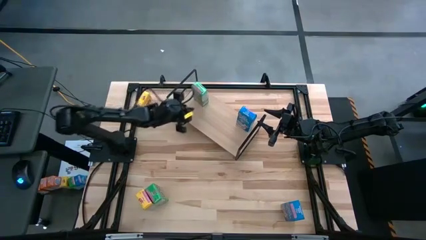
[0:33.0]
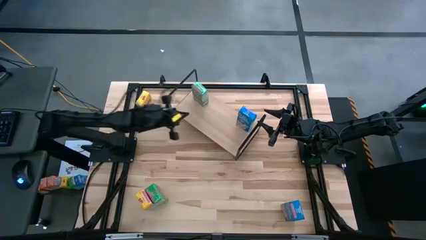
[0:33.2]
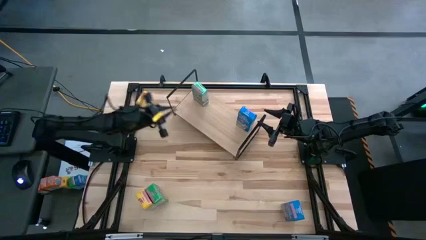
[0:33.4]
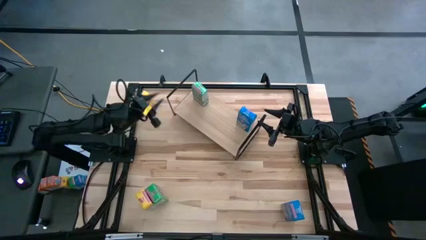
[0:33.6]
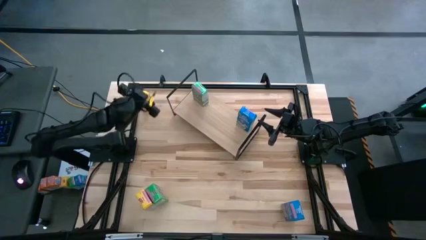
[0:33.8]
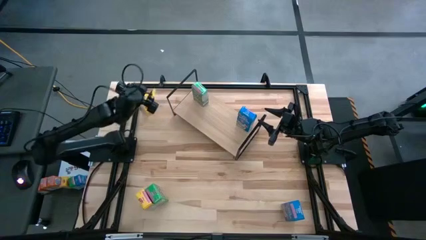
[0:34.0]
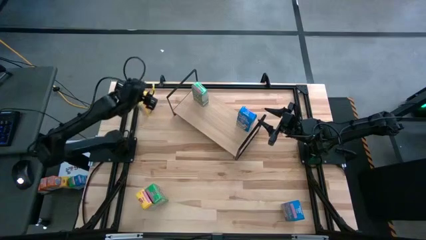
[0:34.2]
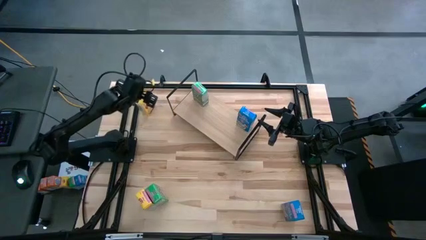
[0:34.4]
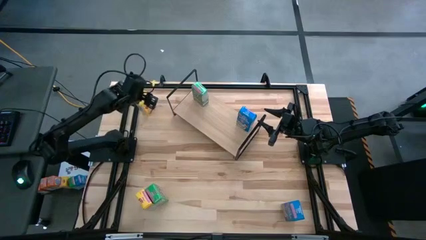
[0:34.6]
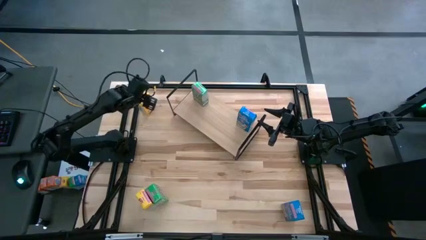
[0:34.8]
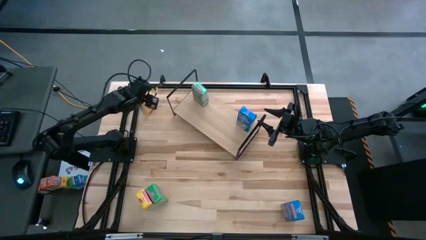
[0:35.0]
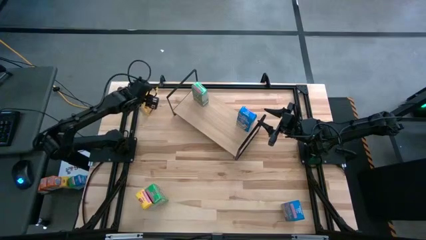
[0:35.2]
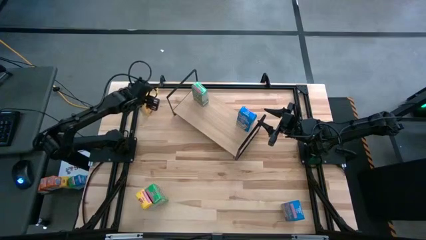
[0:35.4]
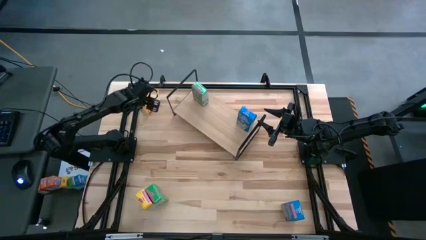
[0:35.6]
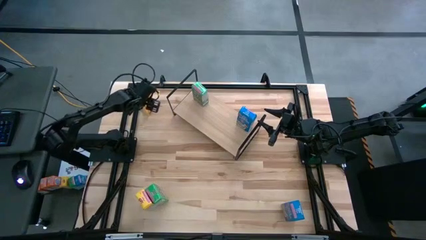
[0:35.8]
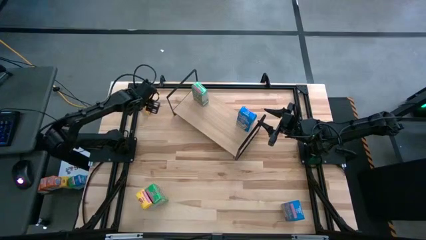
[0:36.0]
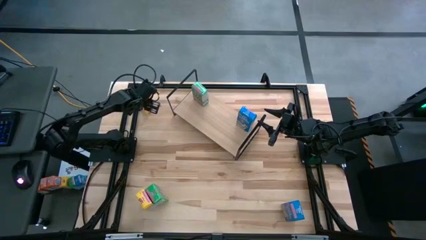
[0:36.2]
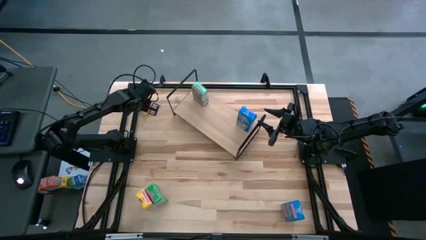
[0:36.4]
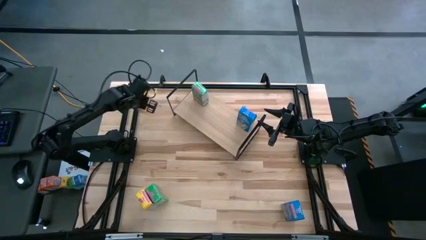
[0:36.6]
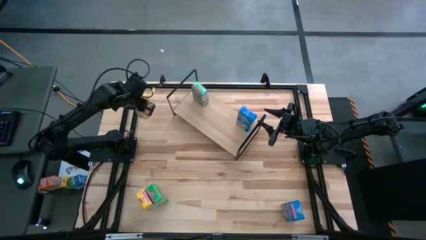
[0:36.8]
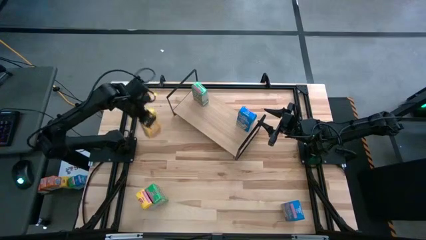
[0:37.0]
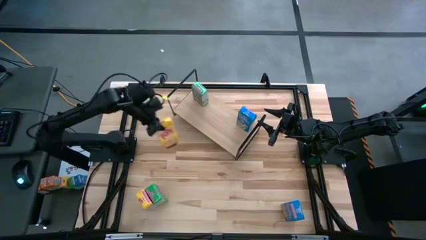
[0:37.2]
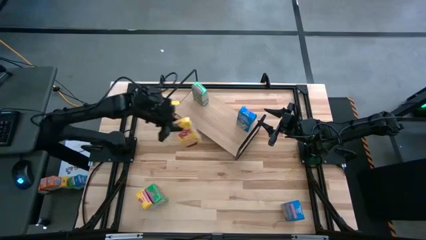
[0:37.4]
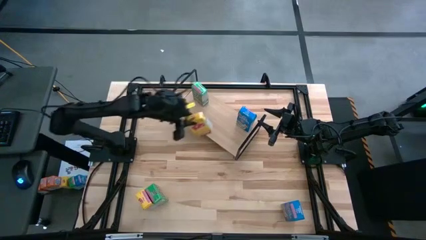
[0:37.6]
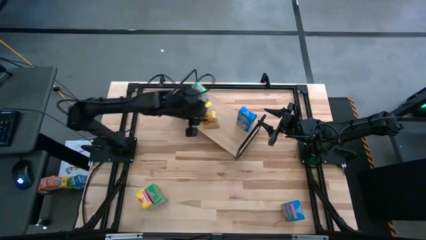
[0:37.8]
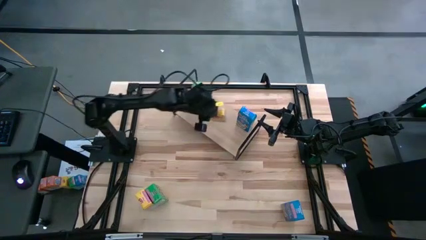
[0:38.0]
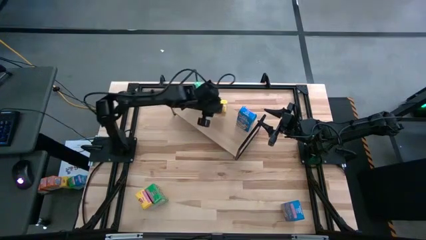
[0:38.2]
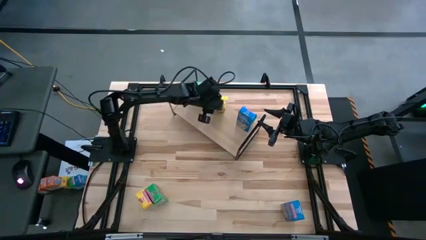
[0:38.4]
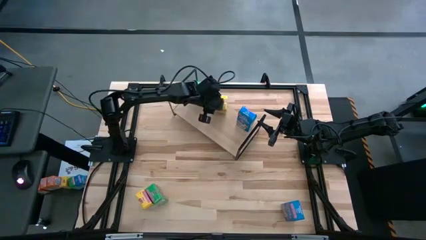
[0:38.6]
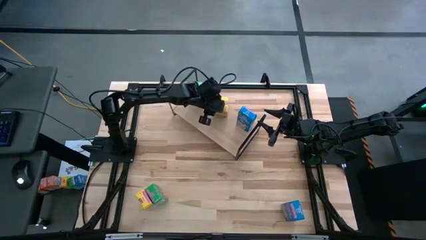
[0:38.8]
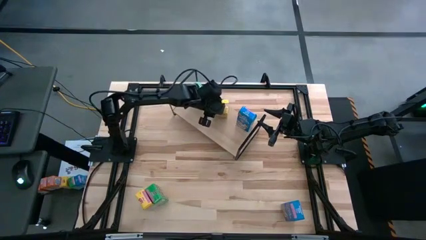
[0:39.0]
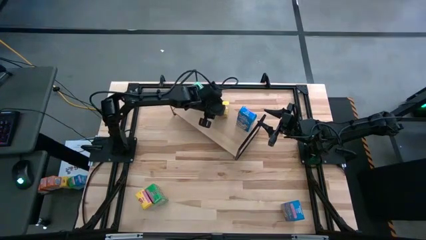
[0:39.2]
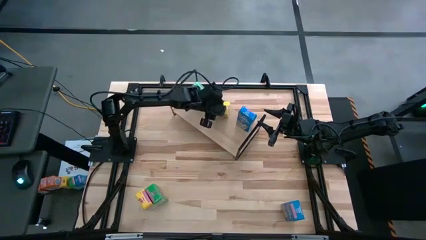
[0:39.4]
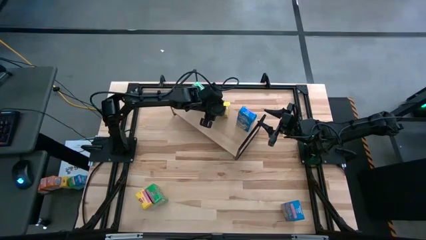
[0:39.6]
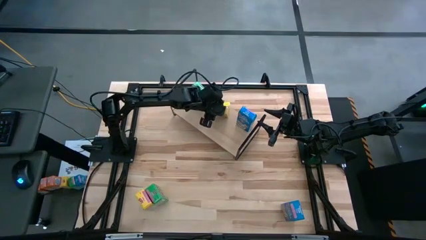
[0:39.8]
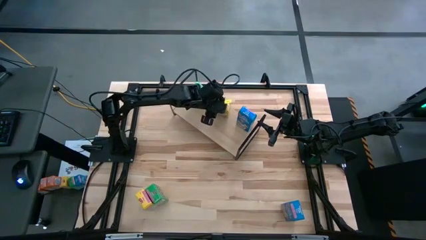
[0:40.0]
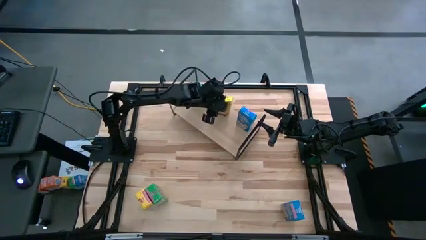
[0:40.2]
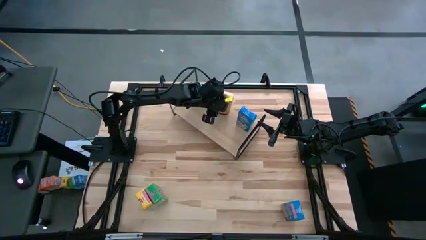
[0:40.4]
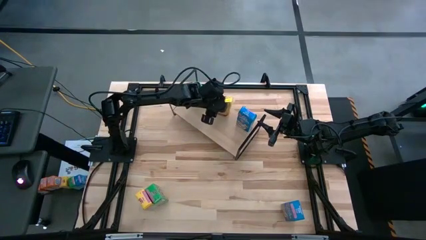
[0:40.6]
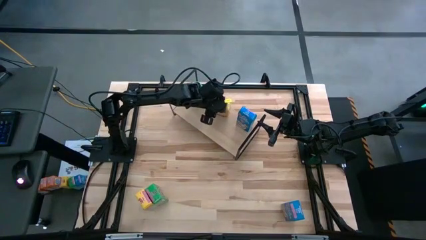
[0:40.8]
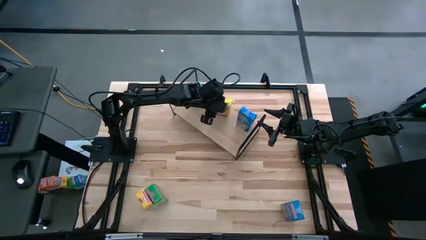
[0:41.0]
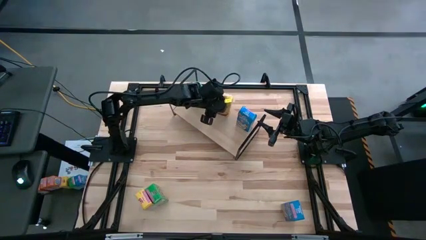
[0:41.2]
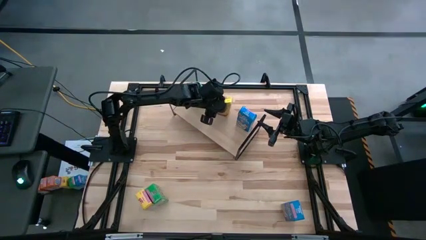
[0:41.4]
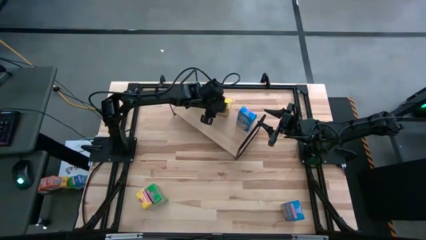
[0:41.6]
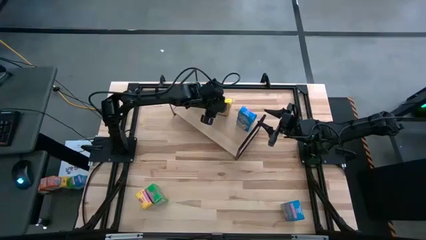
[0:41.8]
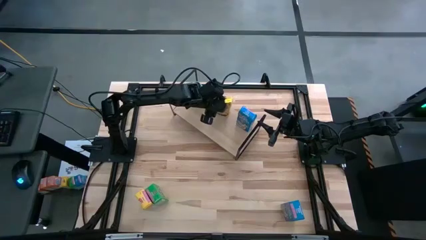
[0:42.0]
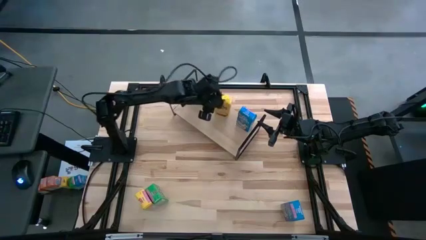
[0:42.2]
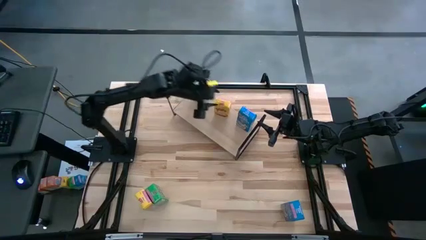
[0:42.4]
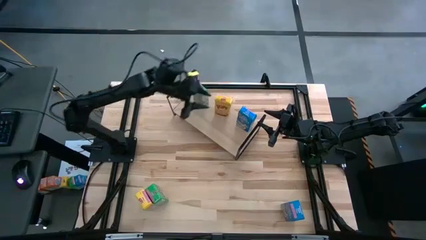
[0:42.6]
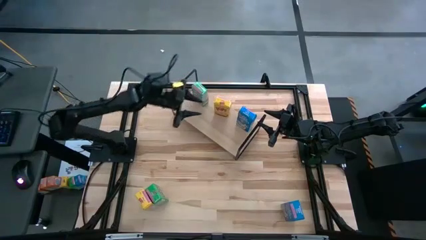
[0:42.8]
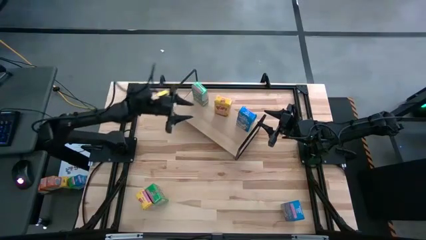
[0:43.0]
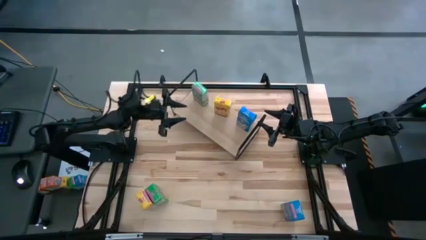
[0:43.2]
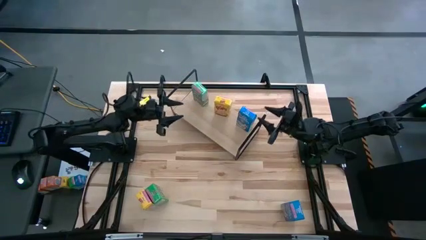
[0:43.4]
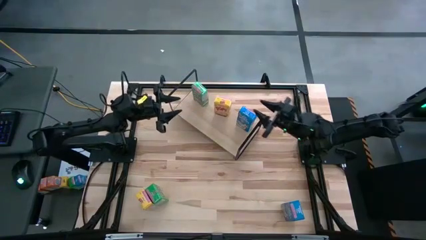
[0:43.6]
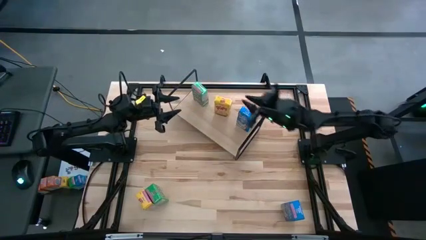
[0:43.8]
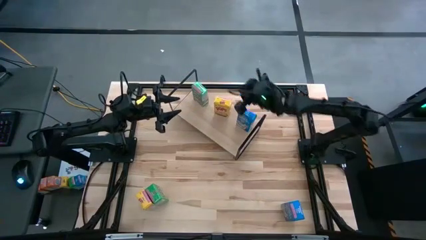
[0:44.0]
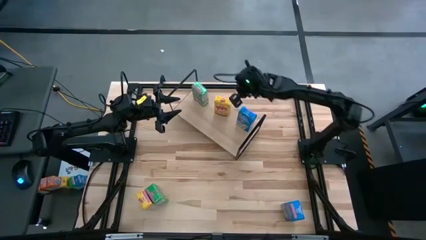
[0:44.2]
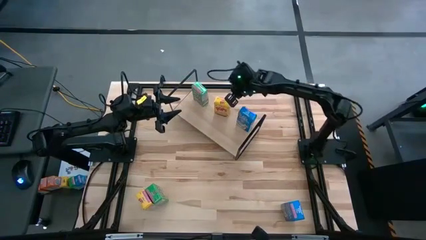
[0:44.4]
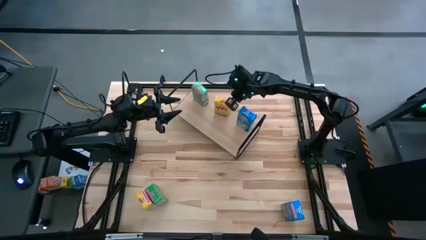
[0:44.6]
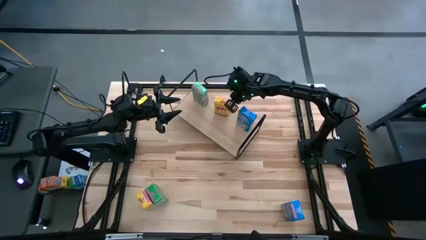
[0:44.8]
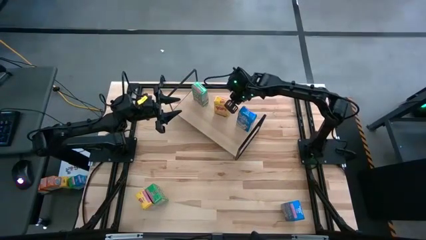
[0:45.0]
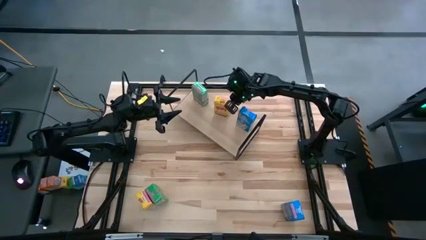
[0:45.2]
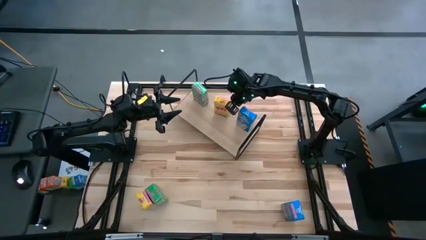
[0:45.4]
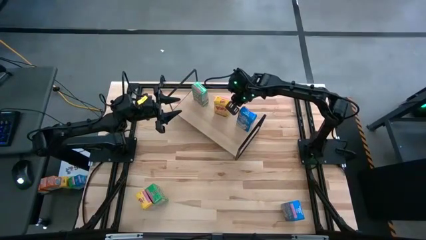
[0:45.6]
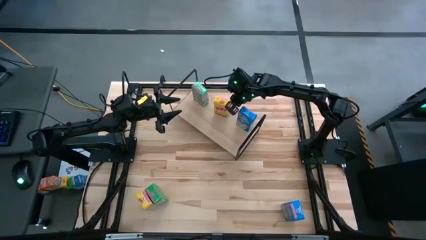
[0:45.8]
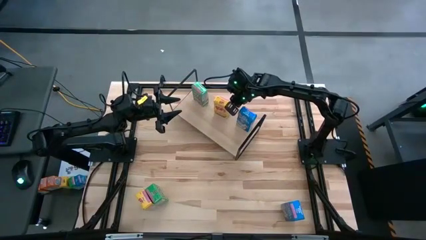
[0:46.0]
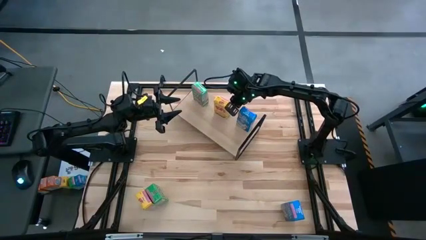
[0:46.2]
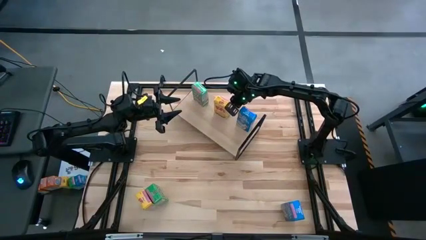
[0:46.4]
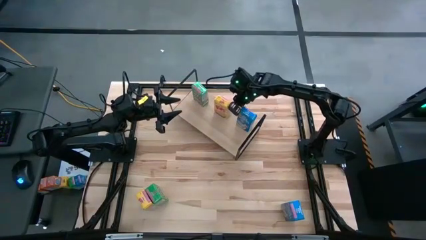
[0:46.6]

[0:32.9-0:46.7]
Task: Stack cereal on shelf
Put the top yellow cereal box on the shelf

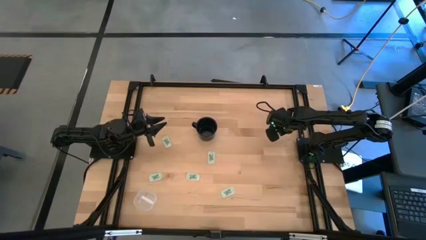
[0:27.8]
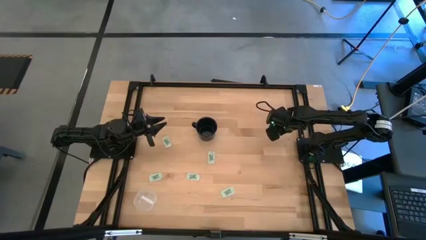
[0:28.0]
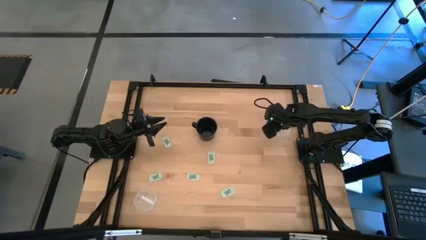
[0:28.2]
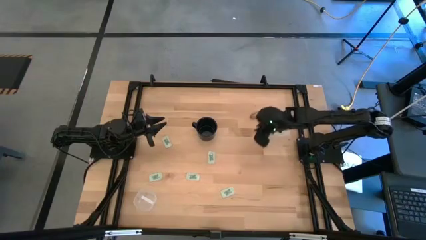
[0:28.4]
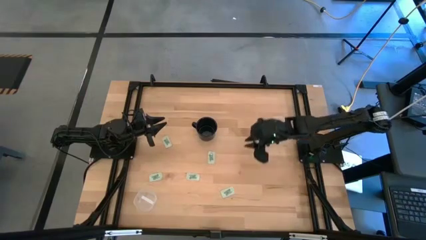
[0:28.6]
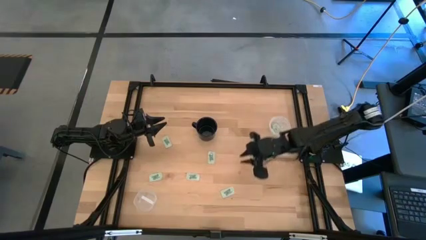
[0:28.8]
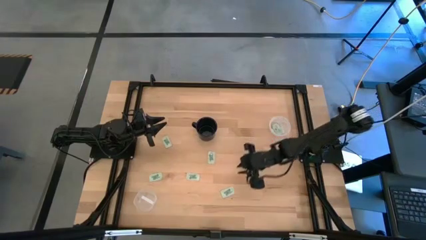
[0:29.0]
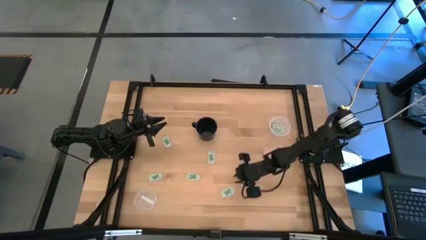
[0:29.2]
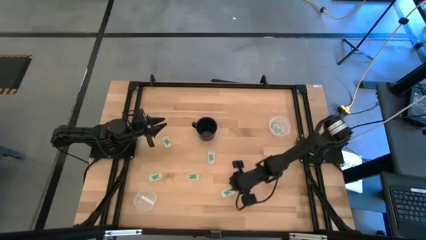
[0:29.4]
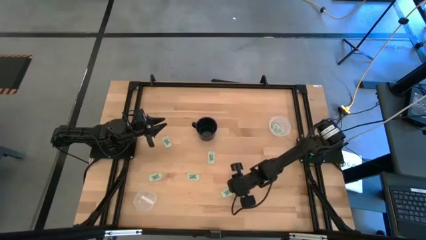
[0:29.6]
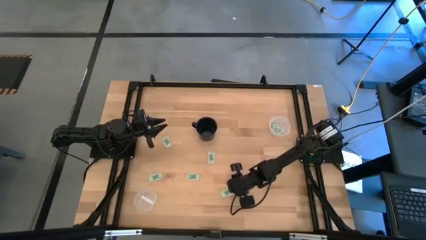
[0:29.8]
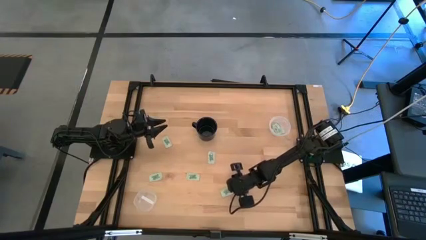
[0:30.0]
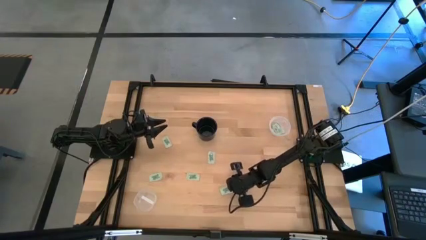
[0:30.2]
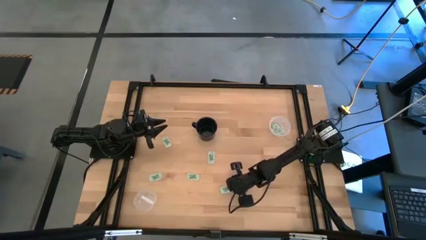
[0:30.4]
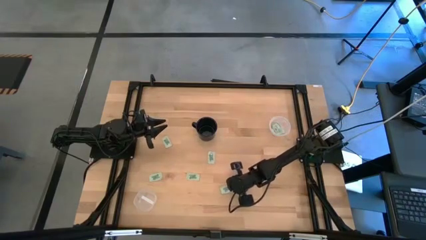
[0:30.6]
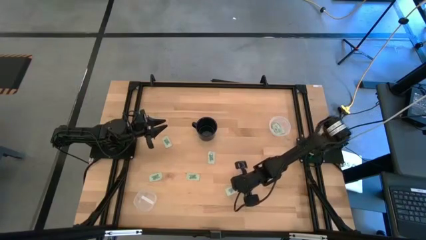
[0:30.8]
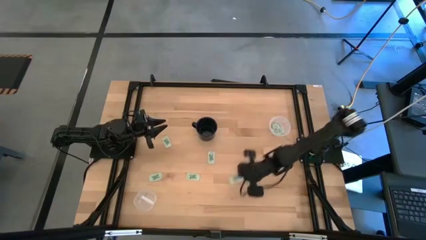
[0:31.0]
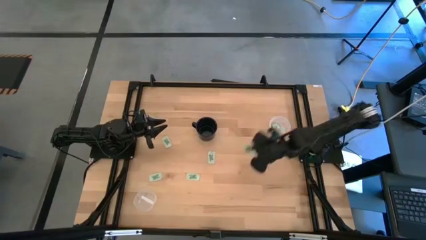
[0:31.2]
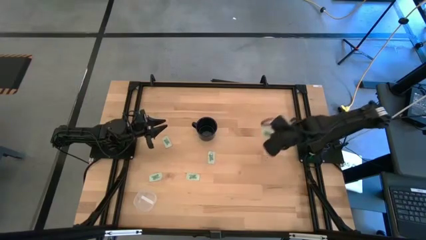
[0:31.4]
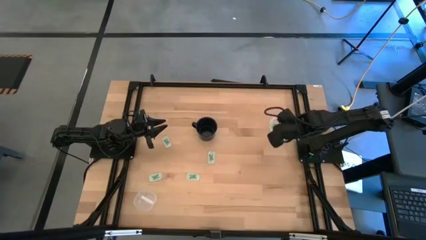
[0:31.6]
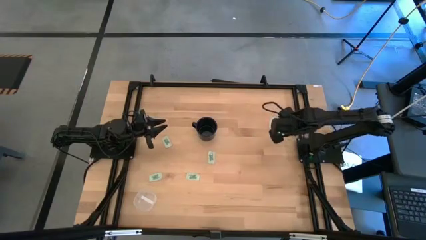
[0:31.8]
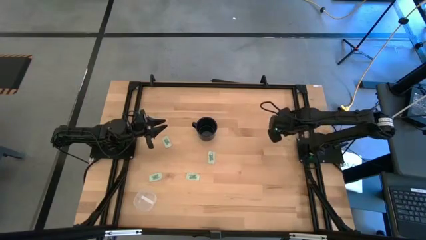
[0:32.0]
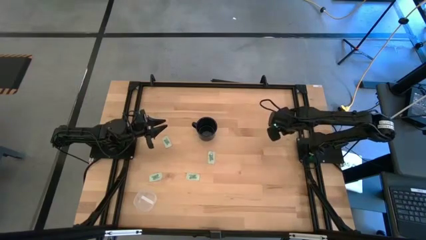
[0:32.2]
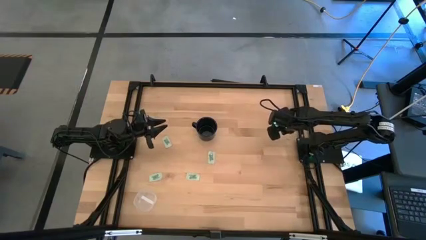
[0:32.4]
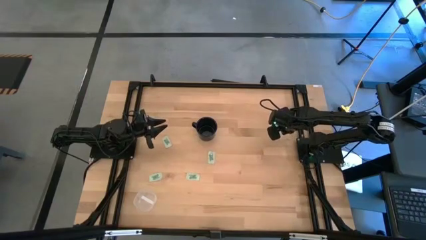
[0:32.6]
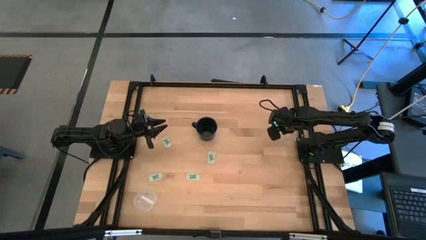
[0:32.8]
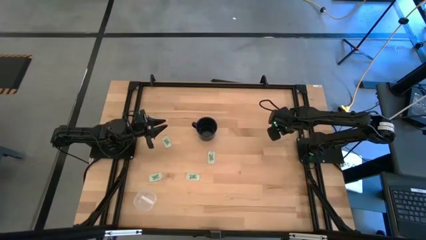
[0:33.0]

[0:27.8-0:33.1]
Task: Pick and place Stevia / Truvia into bins
Put the stevia packet into the round transparent container
